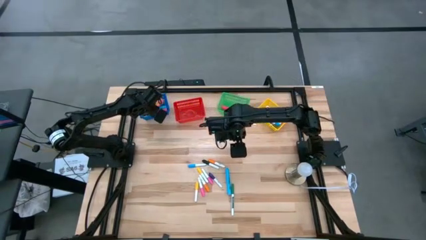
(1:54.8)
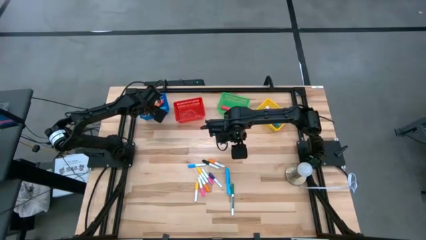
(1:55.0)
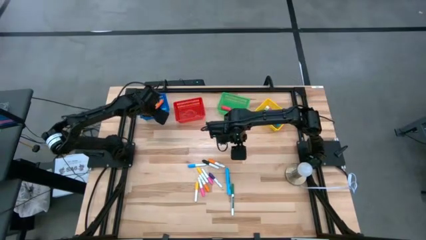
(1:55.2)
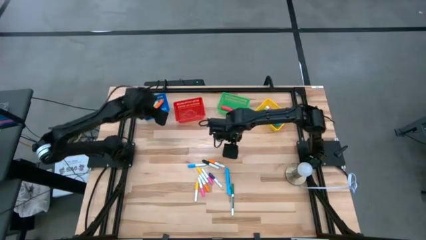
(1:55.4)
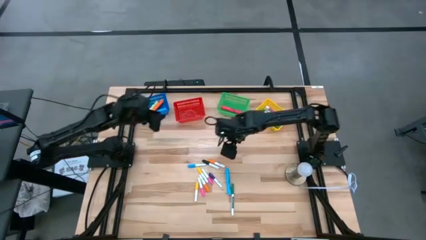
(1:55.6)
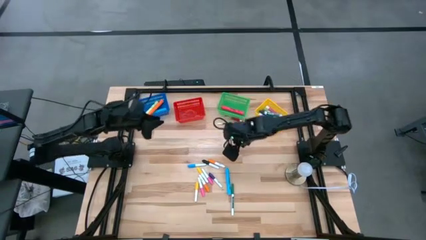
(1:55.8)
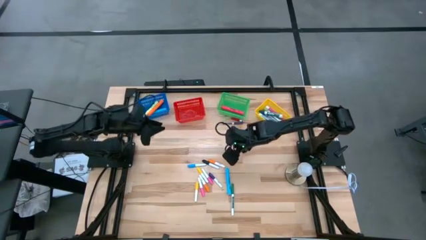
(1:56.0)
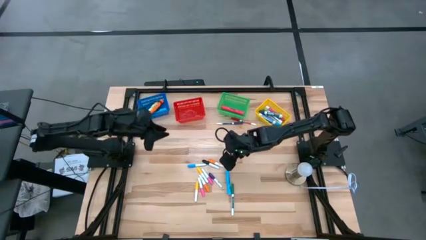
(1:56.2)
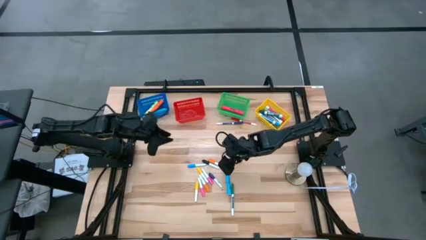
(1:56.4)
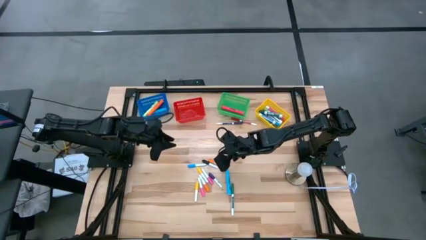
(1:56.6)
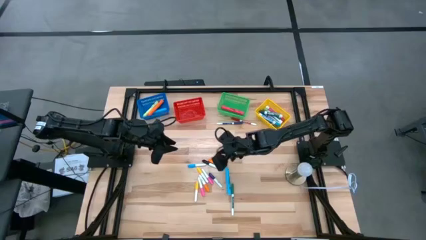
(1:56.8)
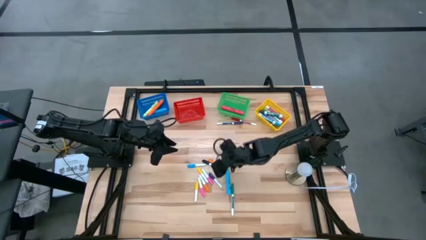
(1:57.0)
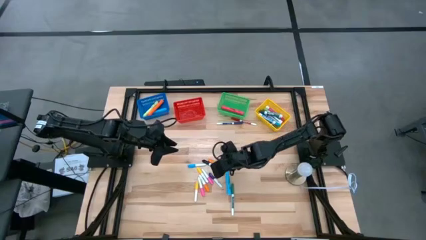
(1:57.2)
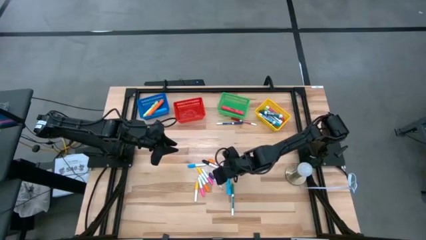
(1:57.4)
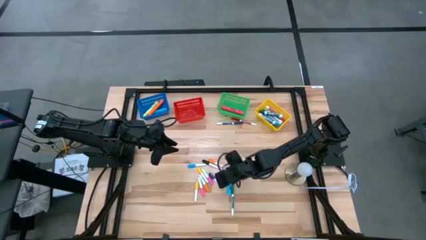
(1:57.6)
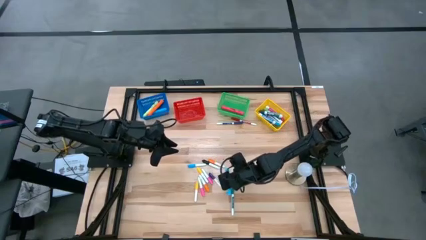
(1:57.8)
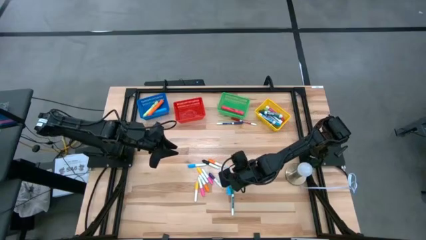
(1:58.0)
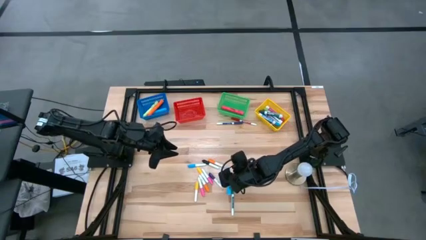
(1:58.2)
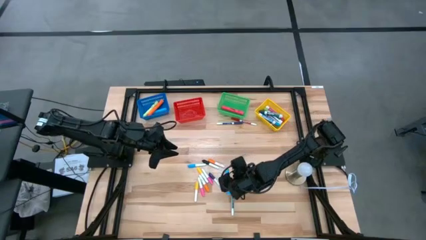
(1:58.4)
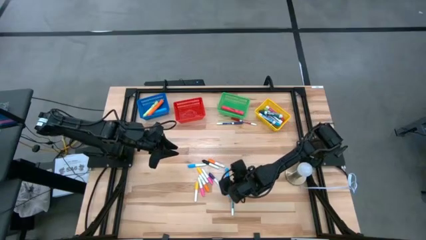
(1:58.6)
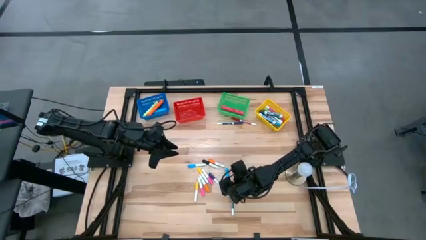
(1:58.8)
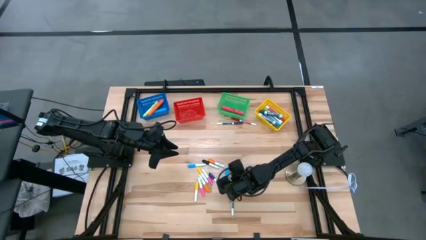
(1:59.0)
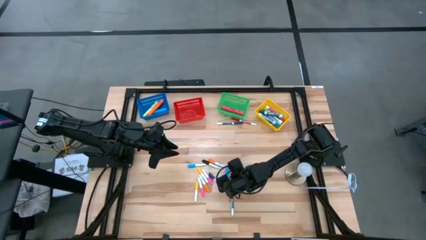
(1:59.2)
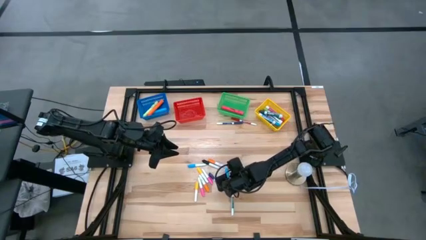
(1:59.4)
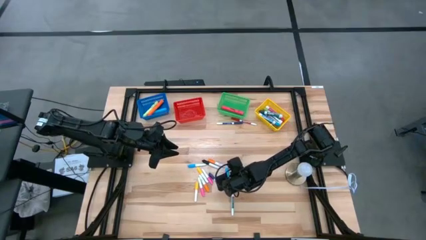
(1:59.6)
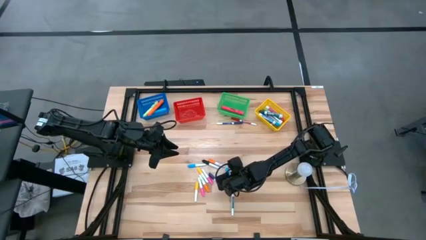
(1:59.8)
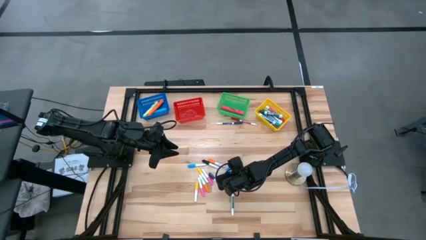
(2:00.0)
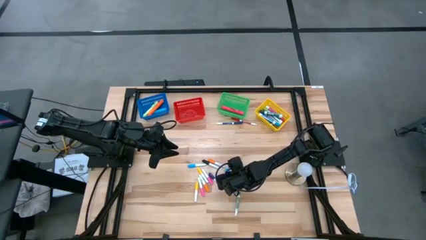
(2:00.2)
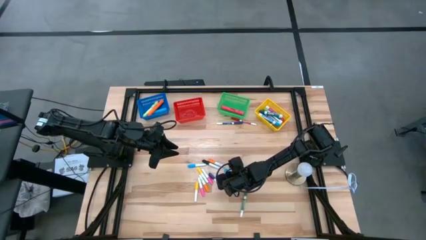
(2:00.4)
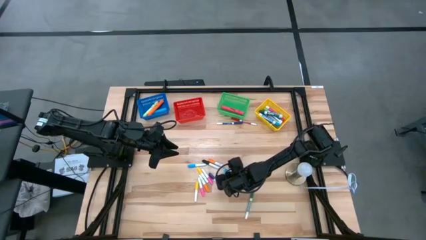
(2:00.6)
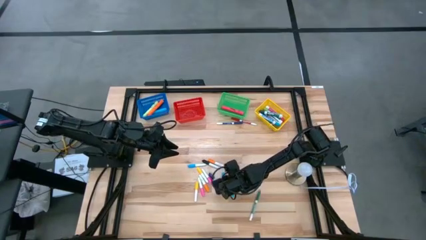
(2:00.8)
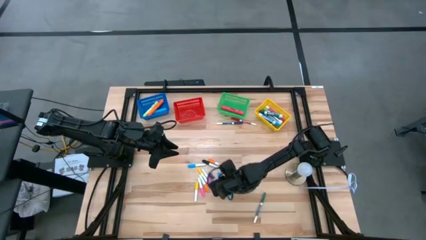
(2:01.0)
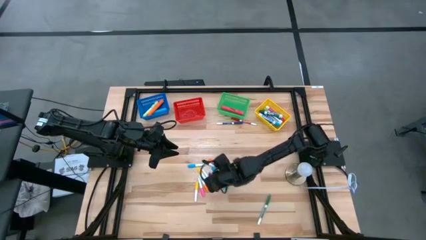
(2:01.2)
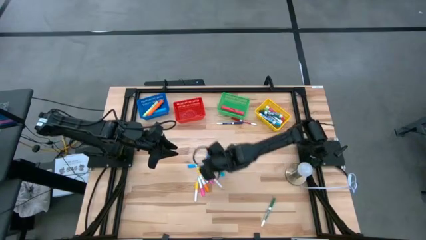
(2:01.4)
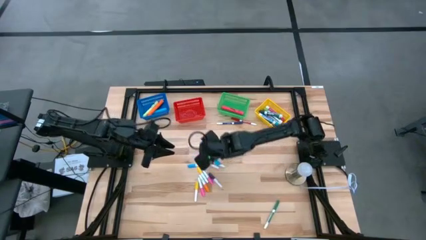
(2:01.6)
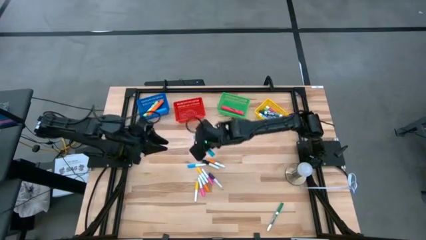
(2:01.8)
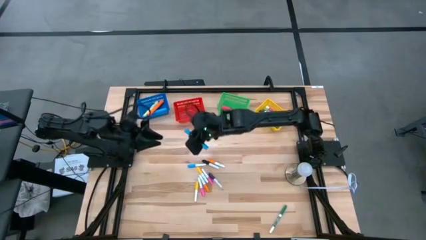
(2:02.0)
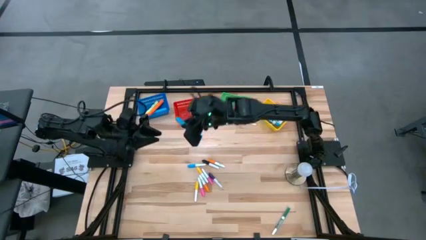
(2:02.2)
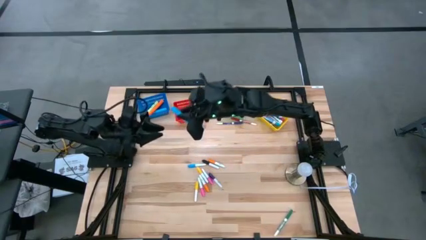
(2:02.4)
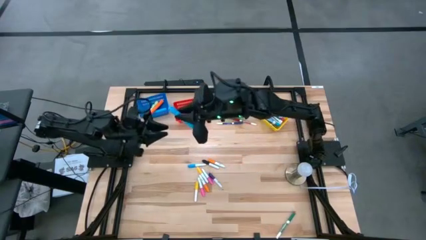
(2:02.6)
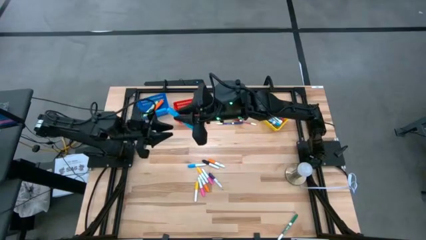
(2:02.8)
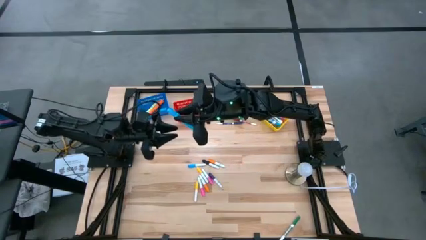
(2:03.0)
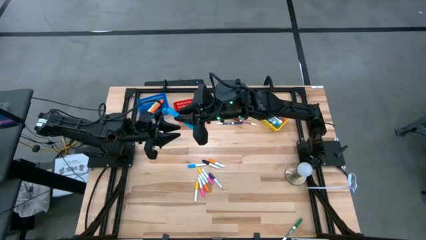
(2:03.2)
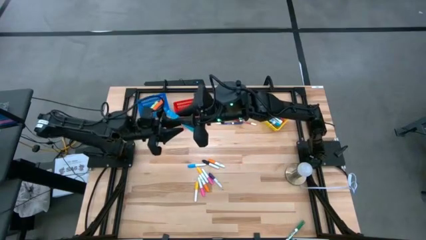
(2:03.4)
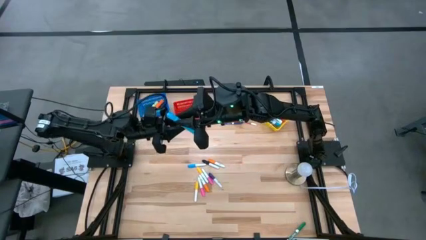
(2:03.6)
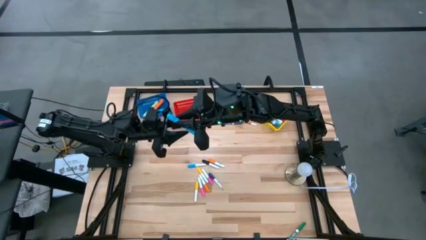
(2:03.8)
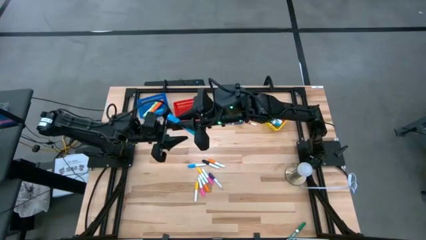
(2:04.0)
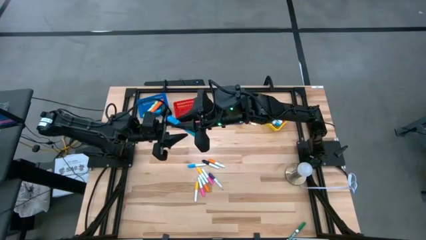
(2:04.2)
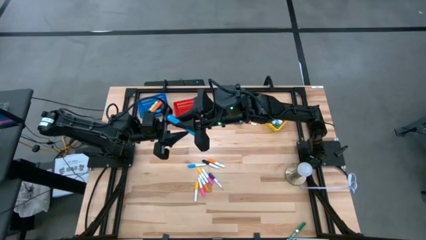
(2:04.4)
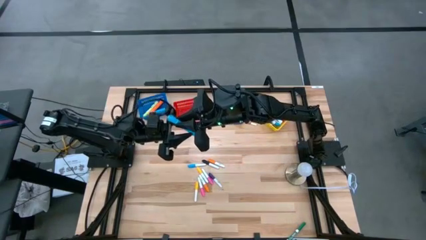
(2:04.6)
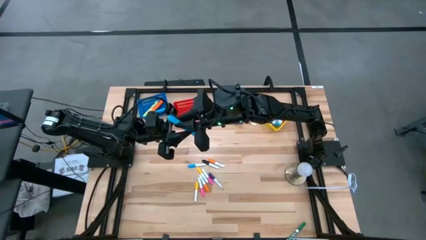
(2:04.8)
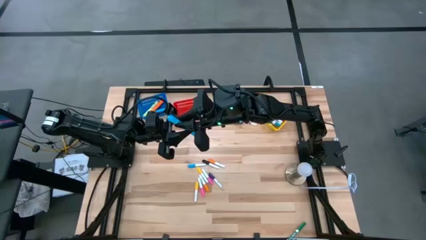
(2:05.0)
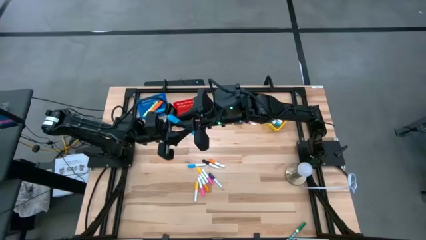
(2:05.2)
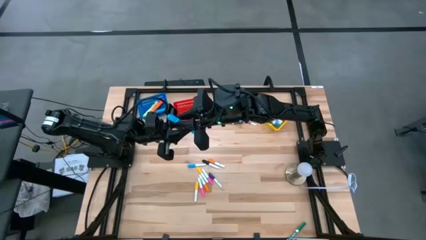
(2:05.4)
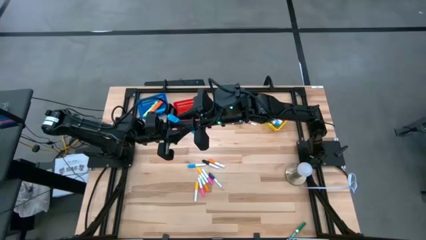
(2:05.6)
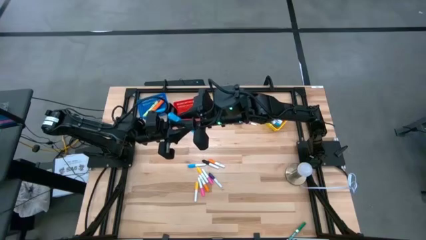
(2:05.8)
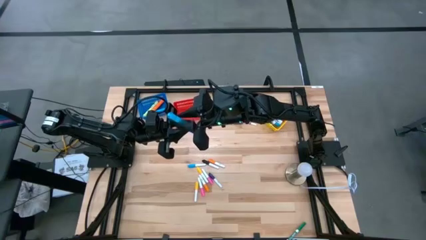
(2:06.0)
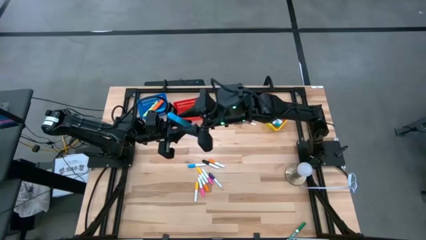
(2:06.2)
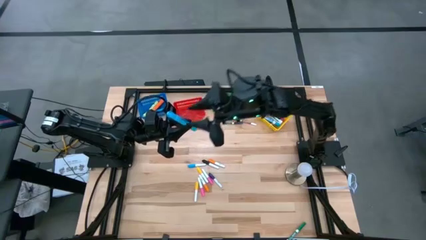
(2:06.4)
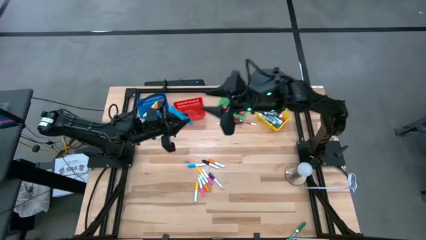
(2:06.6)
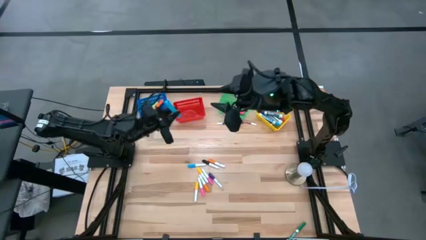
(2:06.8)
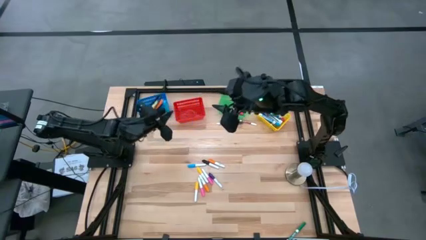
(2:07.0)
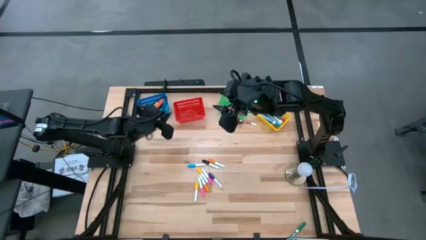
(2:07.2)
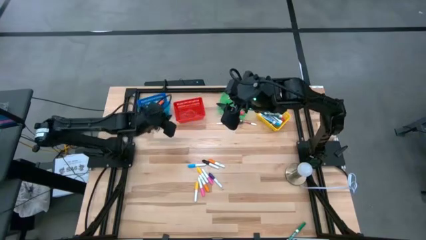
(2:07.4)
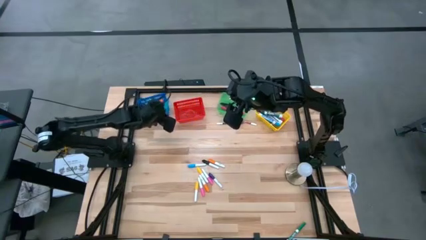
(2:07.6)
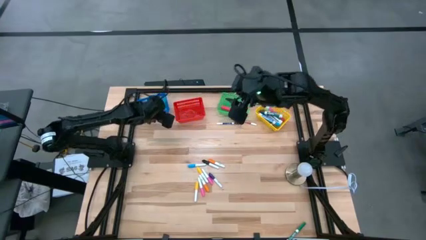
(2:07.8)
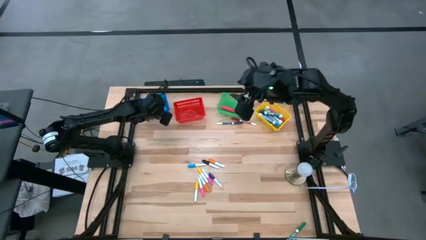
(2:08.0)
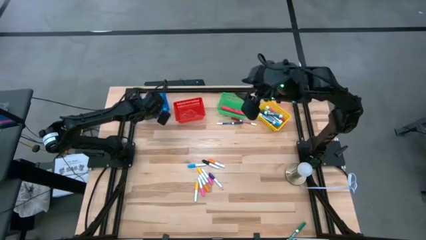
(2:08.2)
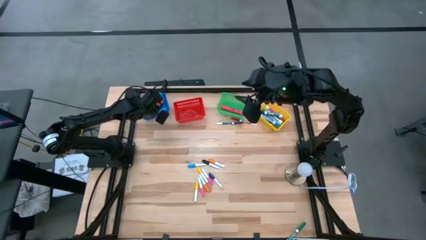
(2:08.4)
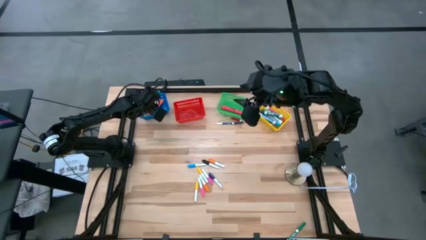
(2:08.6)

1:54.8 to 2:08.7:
Task: Pick & Place Markers
Put the large blue highlighter pen into the blue bin

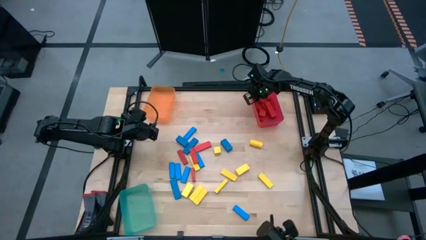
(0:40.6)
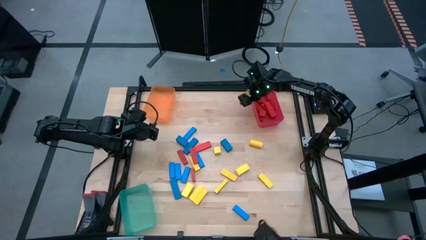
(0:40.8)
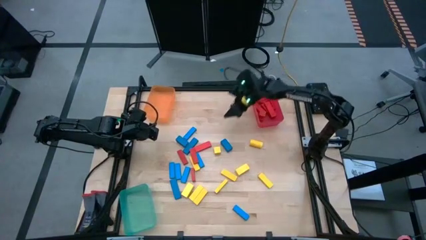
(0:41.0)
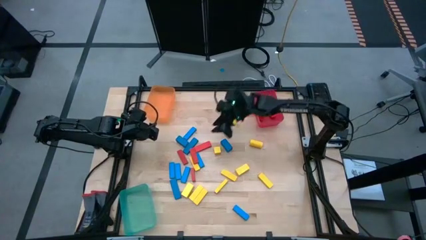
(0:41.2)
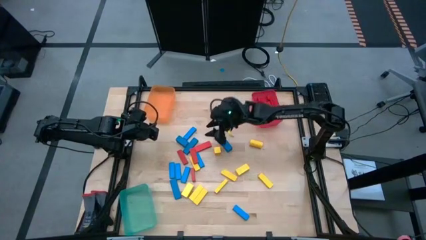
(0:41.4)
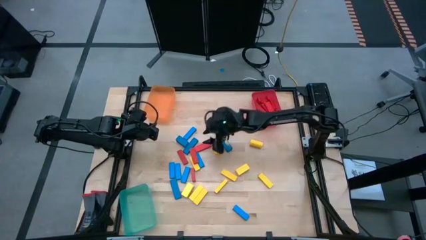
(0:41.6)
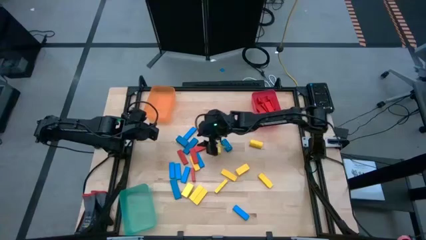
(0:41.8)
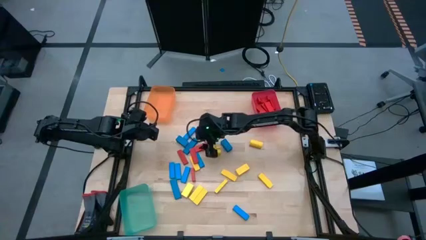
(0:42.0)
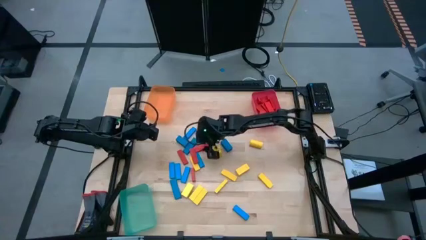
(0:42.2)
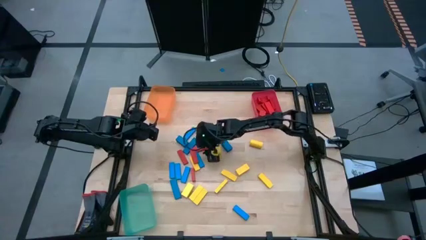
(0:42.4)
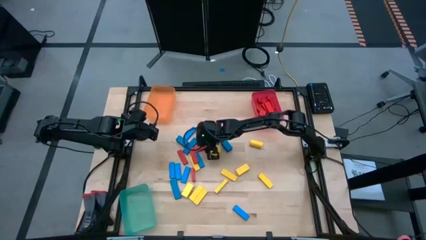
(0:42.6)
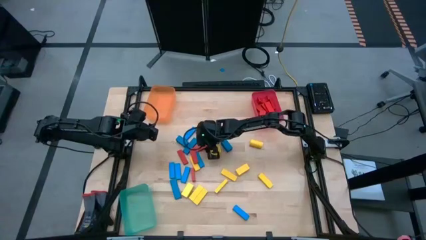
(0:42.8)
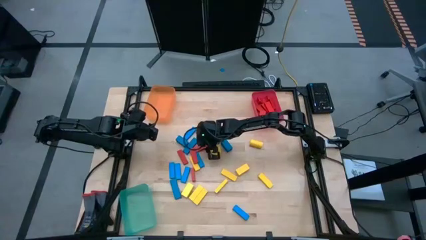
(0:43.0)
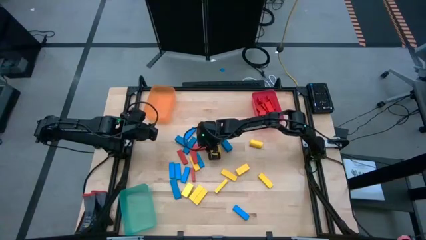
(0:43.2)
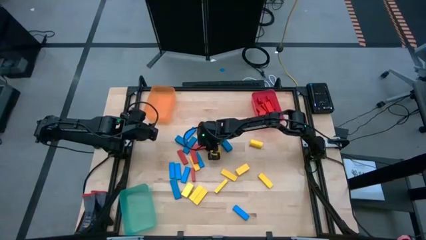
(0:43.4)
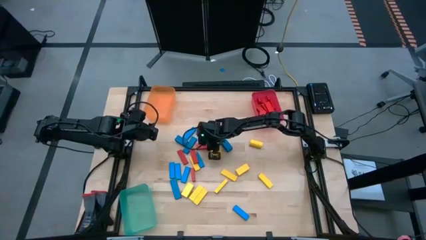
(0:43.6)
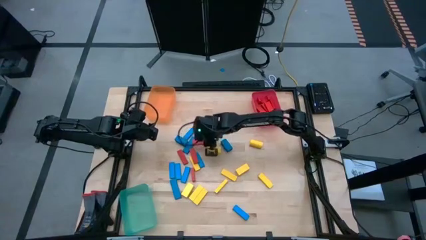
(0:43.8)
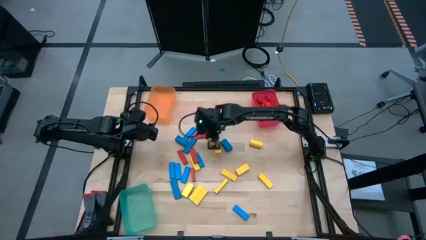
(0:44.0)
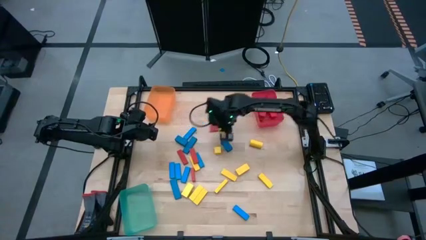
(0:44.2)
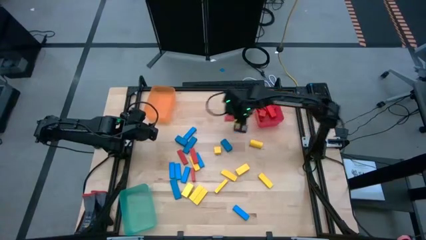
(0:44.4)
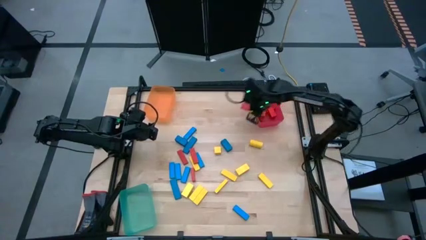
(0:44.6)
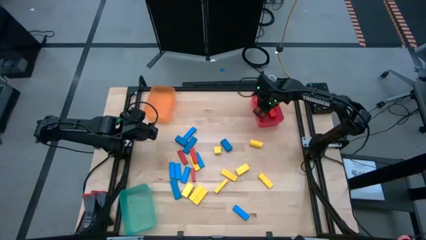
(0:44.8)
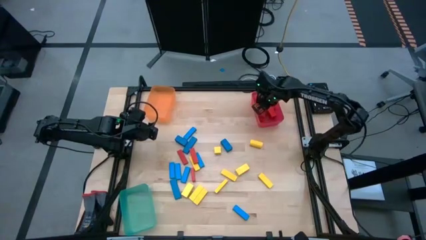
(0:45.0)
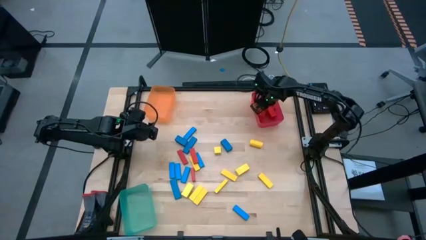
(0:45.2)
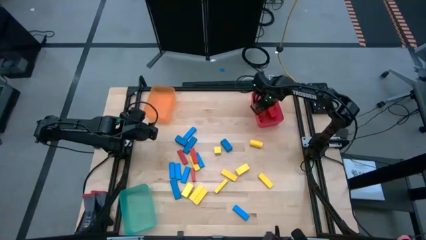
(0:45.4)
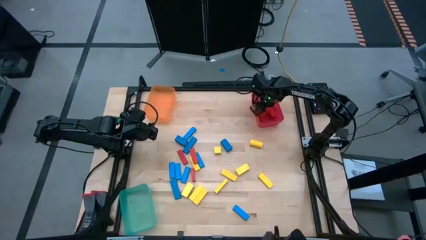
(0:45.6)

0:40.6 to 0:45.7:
Task: Sort blocks
Put the red block into the red transparent bin
